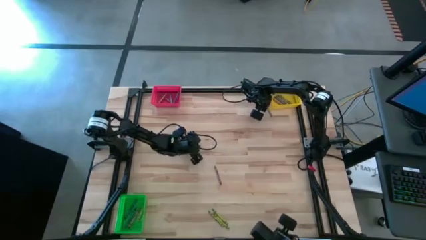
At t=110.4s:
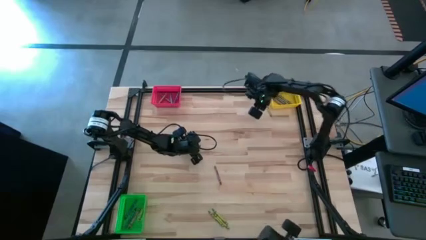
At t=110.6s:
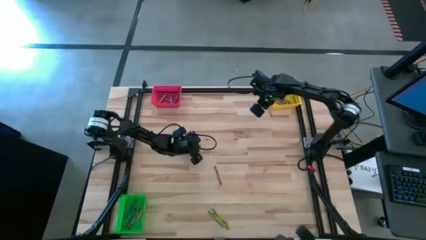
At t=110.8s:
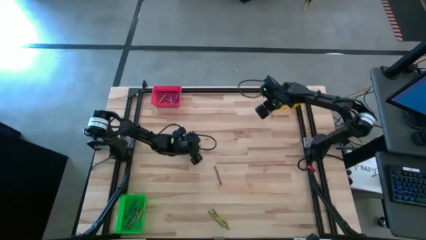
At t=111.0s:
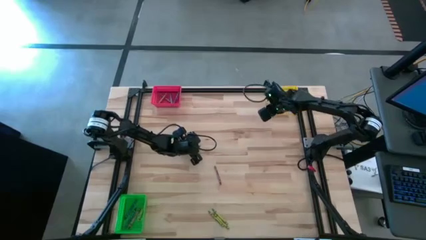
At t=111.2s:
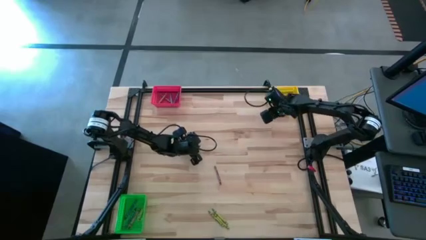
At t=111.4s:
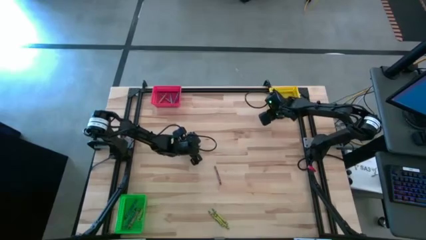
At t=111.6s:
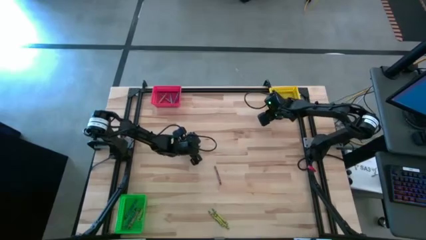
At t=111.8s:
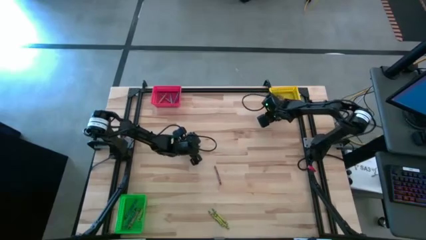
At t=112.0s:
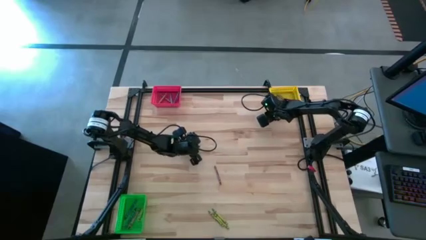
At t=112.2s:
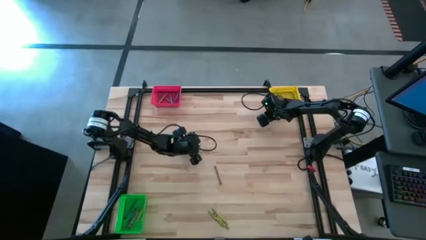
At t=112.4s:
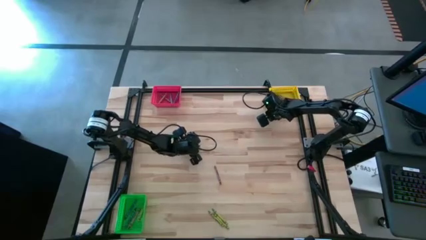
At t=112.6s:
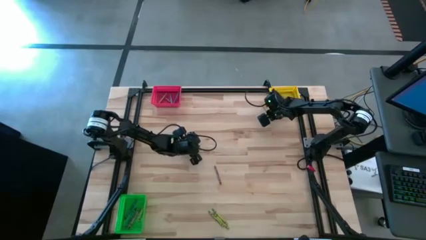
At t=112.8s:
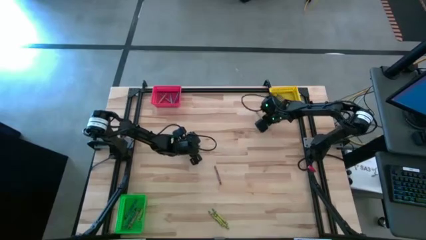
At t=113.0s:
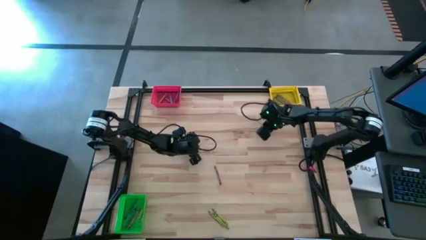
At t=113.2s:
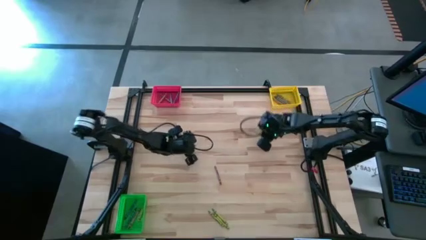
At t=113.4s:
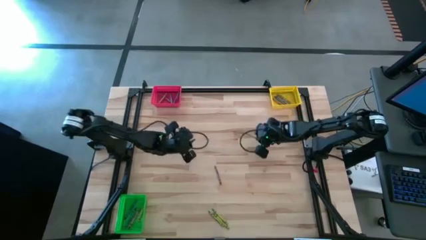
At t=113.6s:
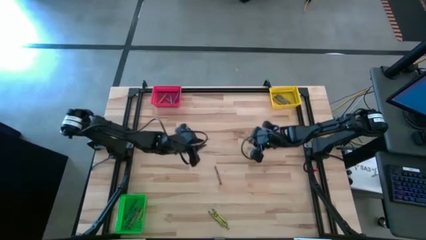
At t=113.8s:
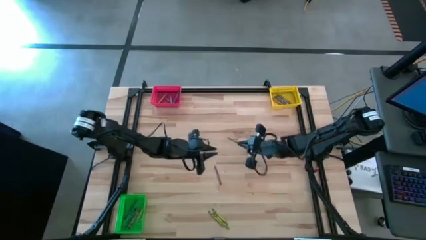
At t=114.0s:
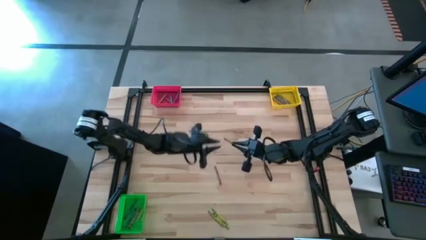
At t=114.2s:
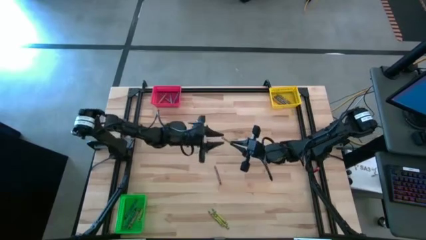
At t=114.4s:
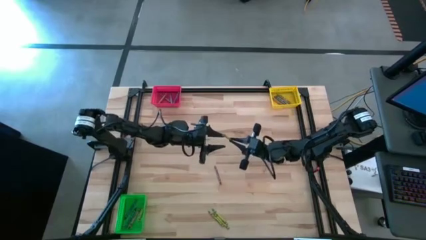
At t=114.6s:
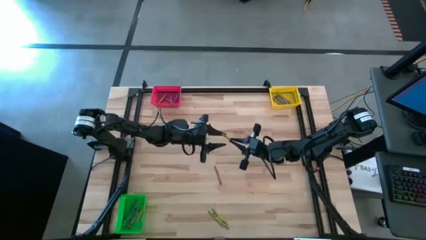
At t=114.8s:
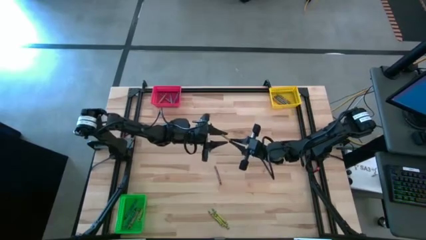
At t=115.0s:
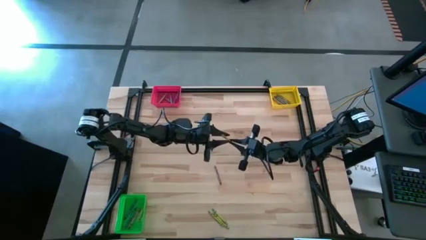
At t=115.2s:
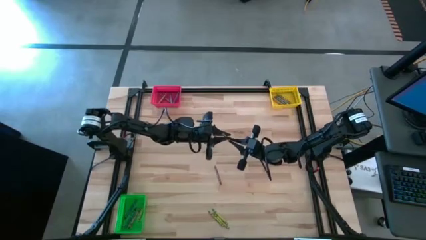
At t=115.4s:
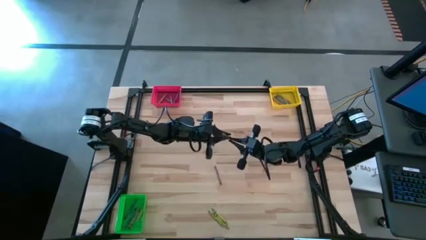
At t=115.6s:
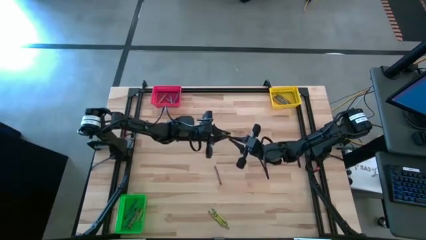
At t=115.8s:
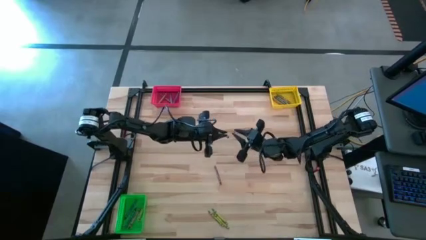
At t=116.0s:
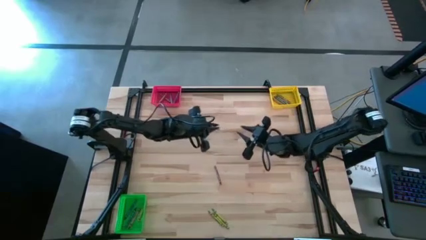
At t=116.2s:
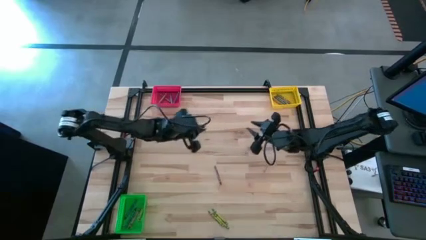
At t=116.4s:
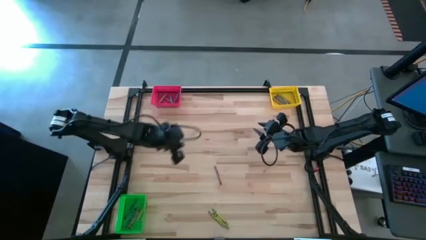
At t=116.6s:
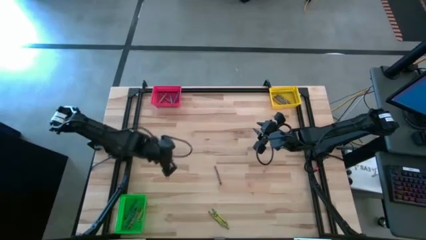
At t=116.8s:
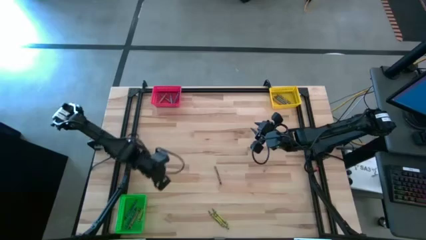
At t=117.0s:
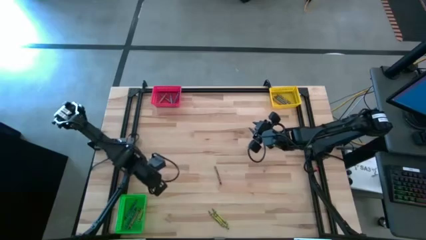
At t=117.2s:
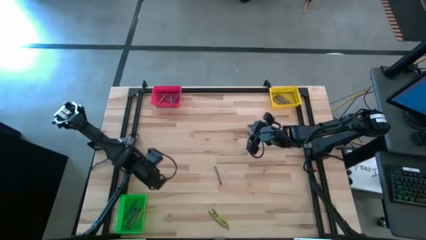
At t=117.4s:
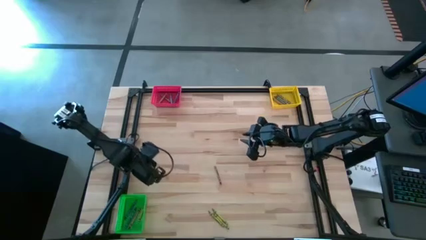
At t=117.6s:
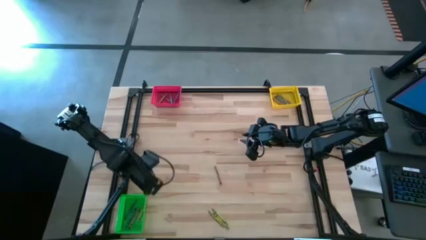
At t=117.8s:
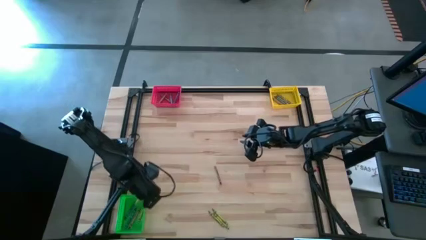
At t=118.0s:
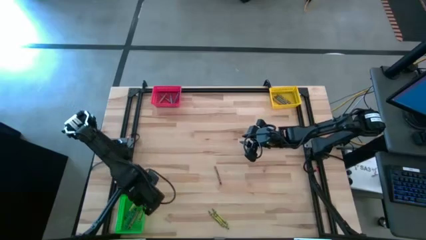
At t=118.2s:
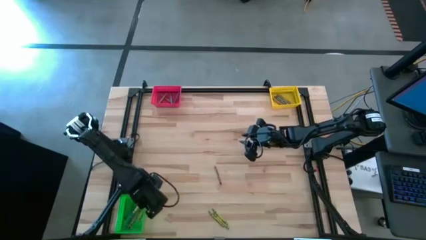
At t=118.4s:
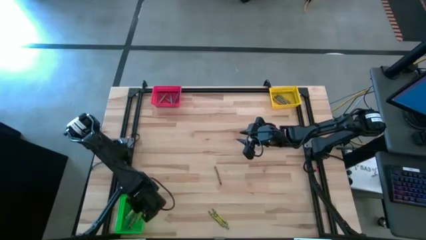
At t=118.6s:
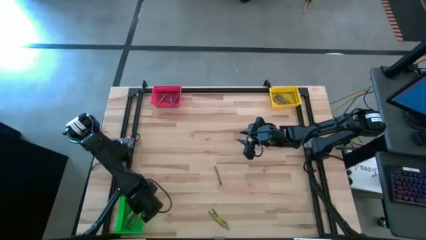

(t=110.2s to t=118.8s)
Task: Sort crayons
Put the green crayon into the green bin

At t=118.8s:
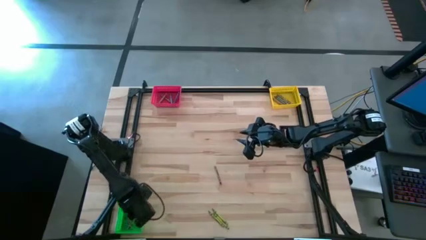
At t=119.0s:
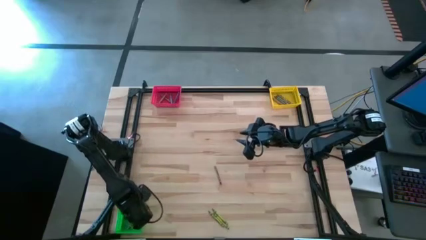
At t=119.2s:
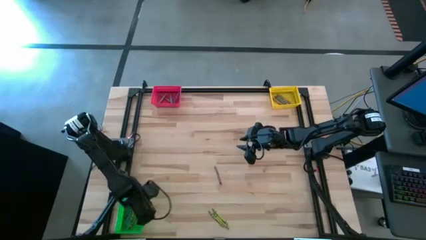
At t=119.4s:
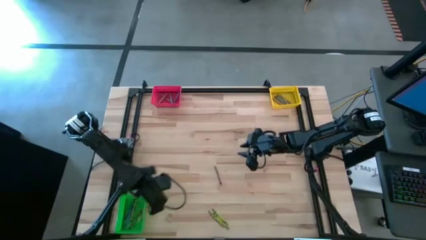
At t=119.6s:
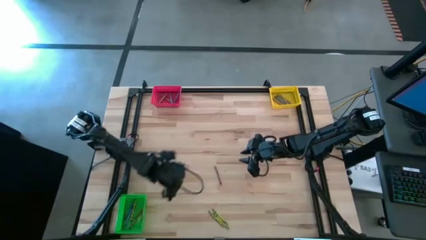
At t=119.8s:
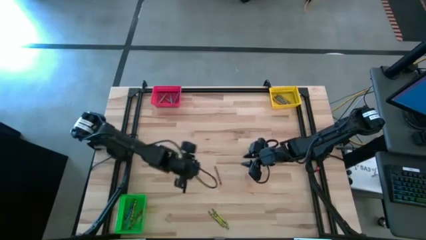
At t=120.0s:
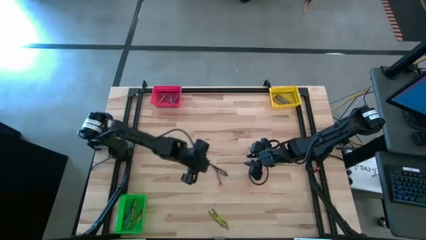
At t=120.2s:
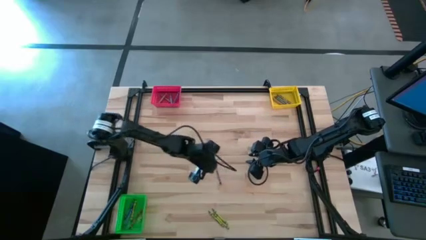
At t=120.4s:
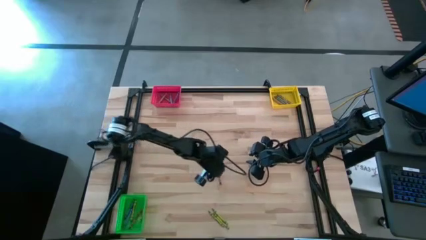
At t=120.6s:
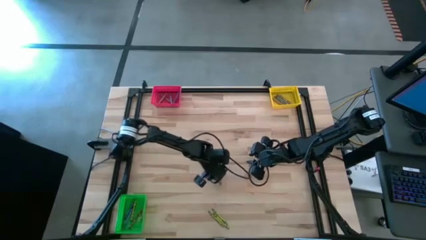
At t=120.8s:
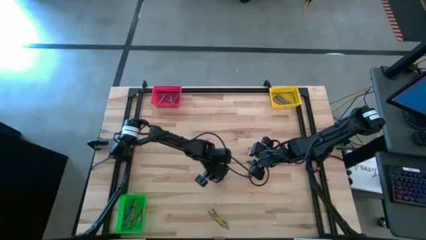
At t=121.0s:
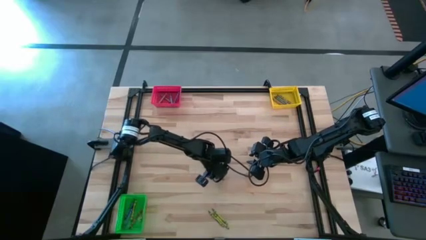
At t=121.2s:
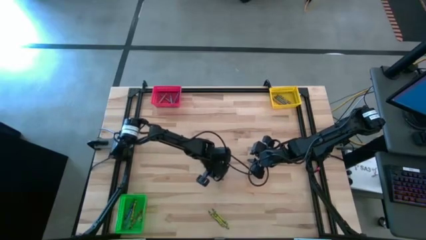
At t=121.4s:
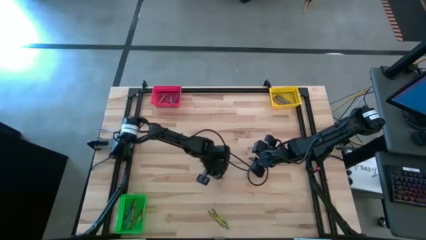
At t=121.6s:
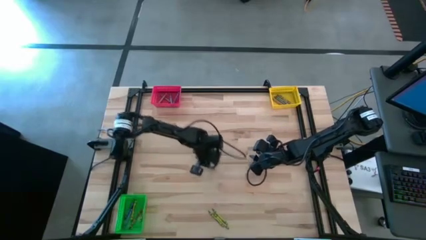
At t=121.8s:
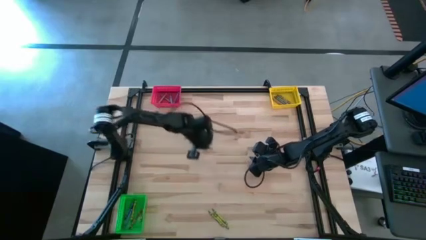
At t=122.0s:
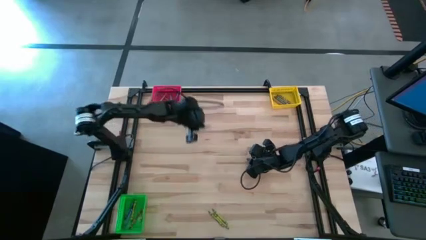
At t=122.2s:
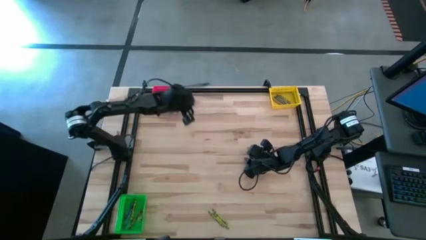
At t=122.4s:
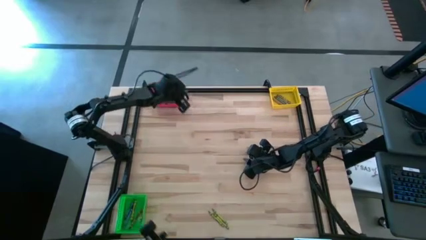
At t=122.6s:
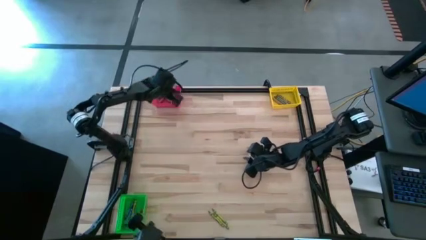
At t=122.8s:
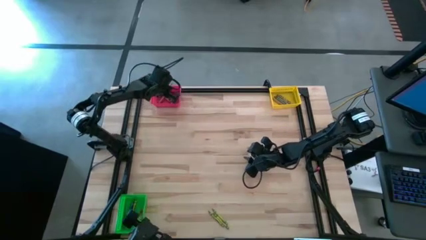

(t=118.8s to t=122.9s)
Put the brown crayon into the red bin

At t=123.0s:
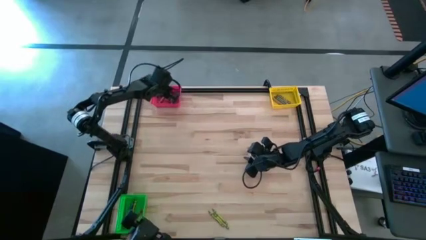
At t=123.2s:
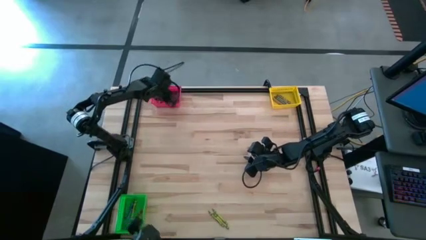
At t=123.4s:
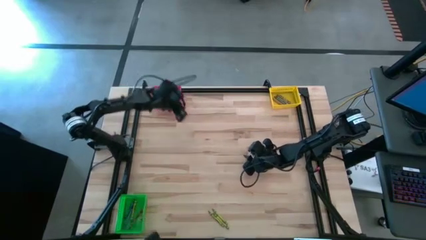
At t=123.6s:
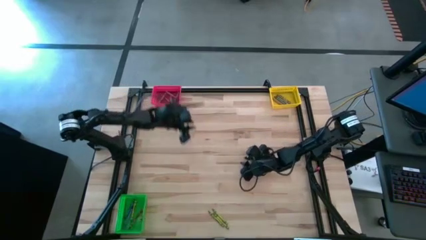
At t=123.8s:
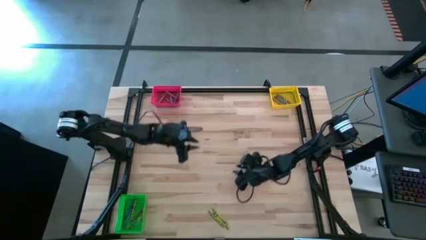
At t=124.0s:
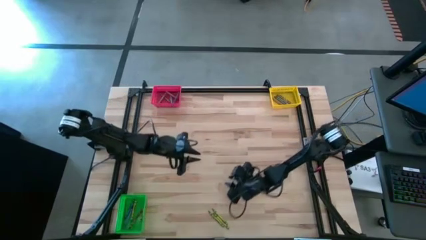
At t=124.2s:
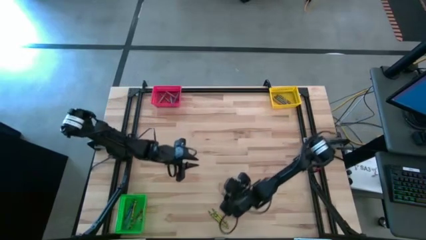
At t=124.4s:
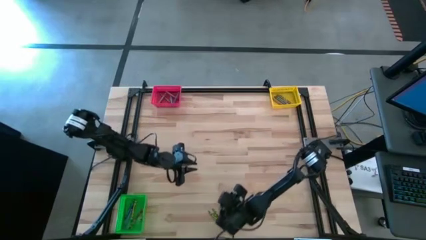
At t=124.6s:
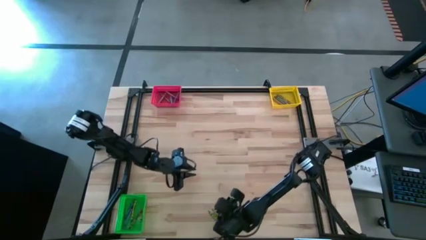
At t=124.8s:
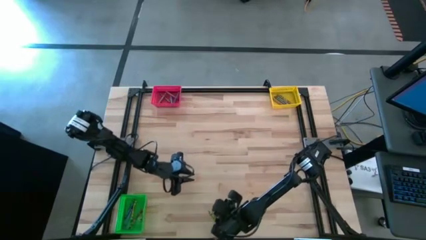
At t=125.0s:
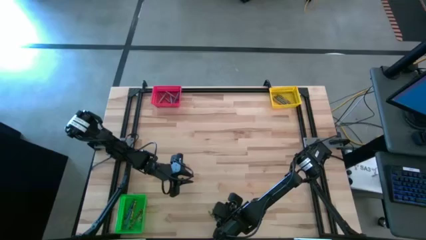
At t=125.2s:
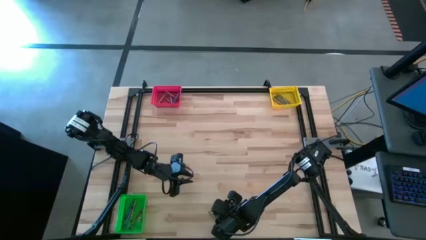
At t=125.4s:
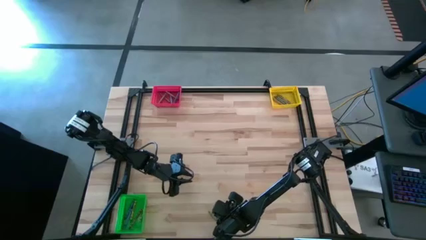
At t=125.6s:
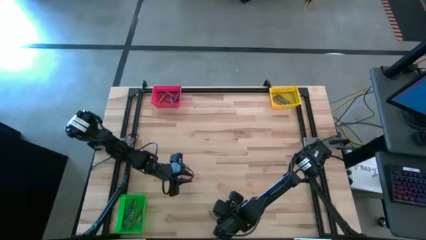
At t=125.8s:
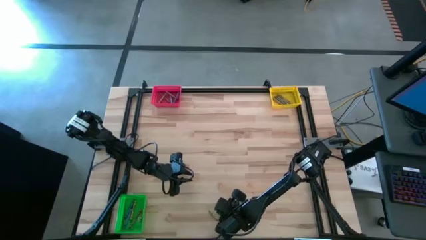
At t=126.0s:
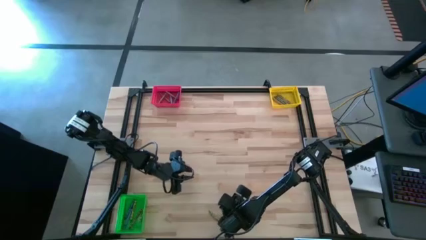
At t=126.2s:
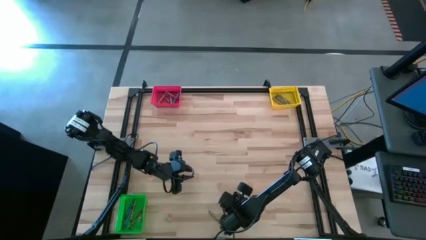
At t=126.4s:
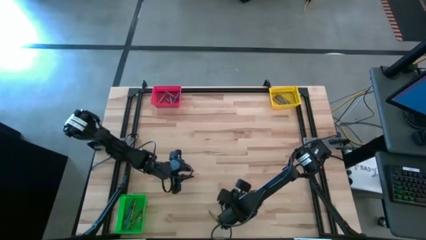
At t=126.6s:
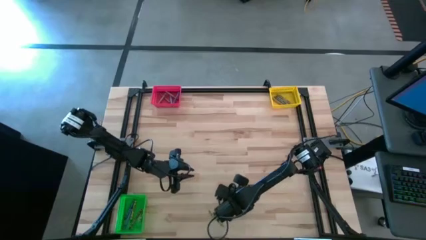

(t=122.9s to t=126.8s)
Put the green crayon into the yellow bin
